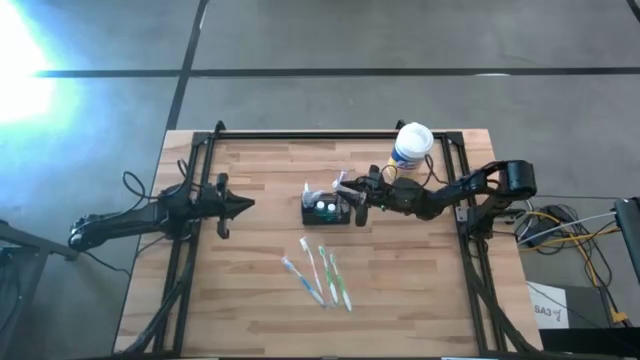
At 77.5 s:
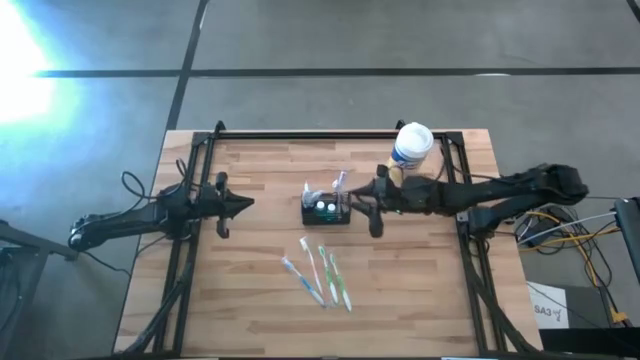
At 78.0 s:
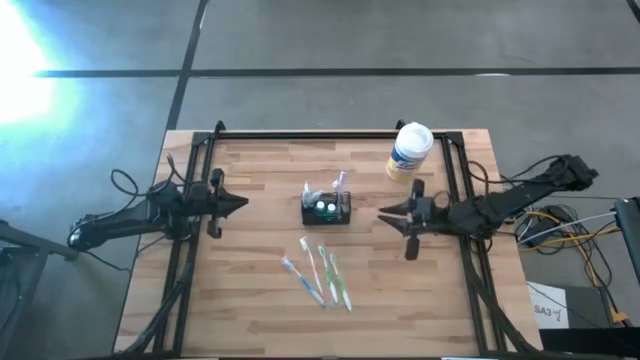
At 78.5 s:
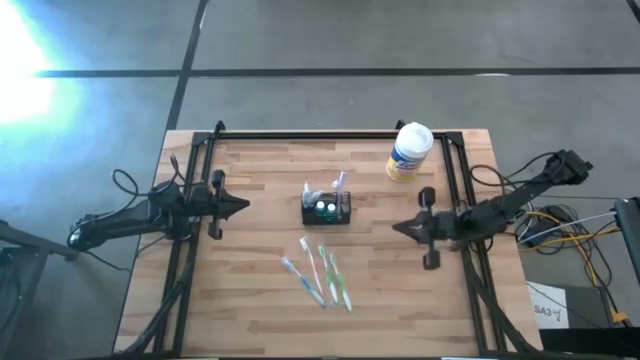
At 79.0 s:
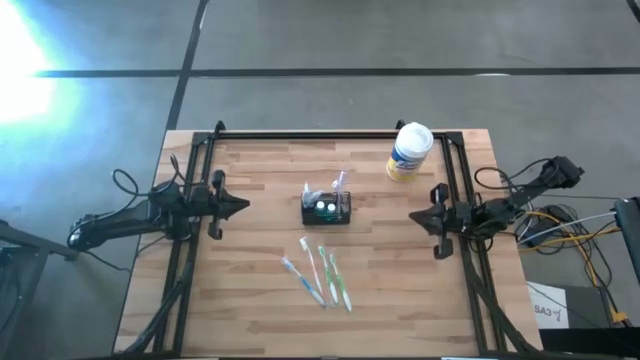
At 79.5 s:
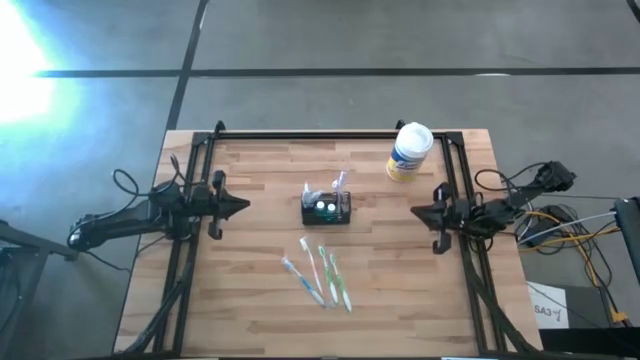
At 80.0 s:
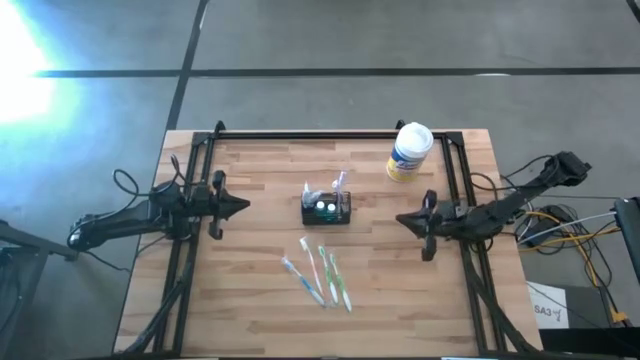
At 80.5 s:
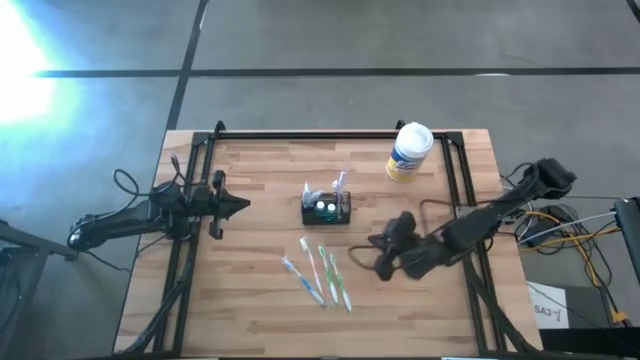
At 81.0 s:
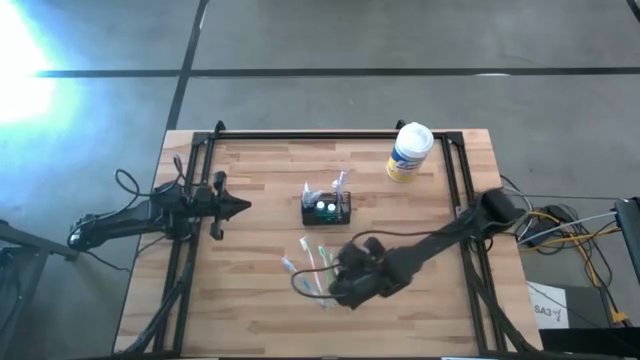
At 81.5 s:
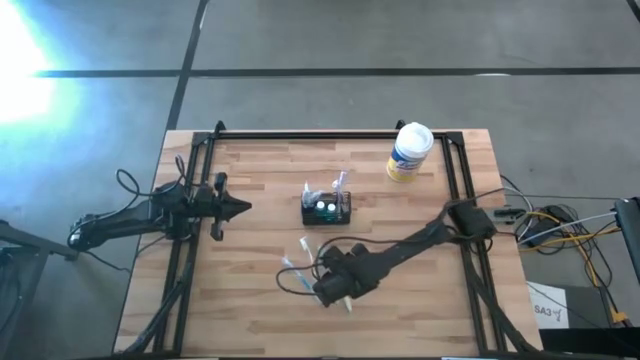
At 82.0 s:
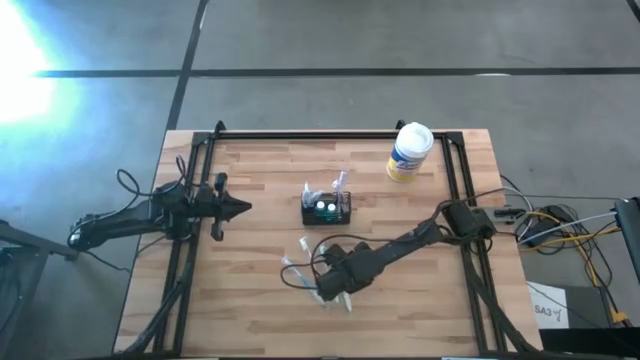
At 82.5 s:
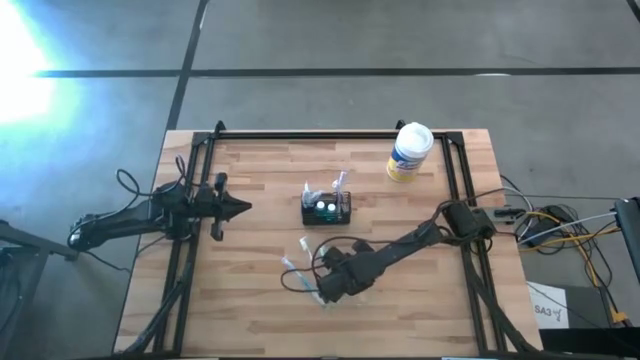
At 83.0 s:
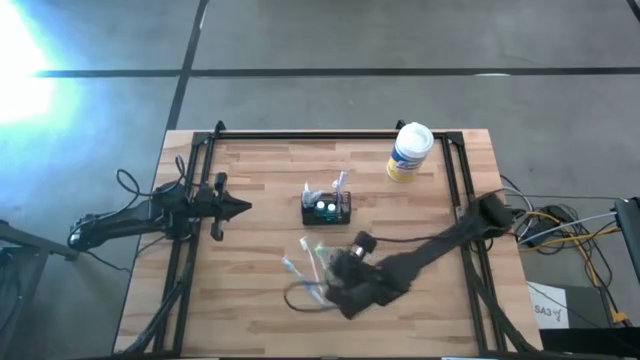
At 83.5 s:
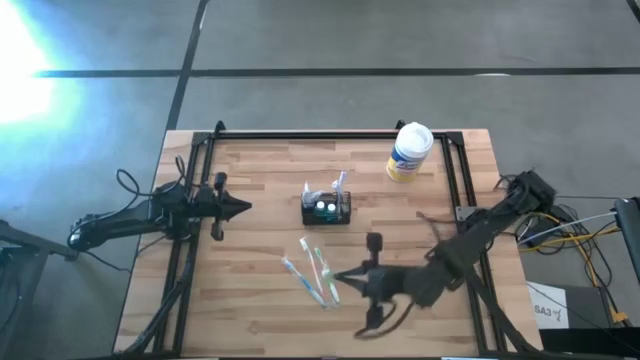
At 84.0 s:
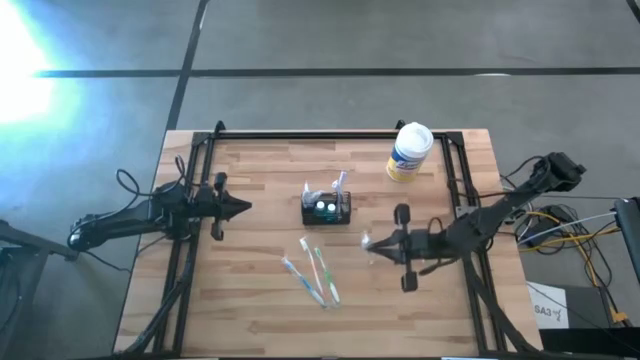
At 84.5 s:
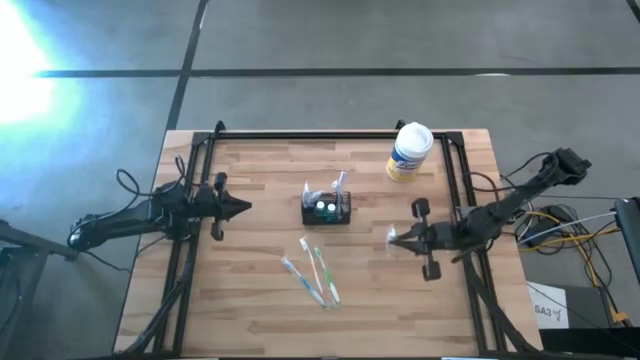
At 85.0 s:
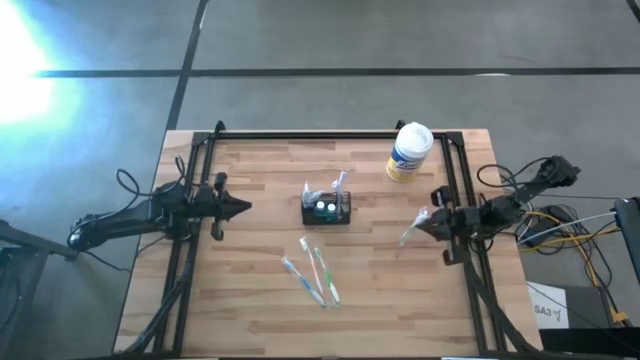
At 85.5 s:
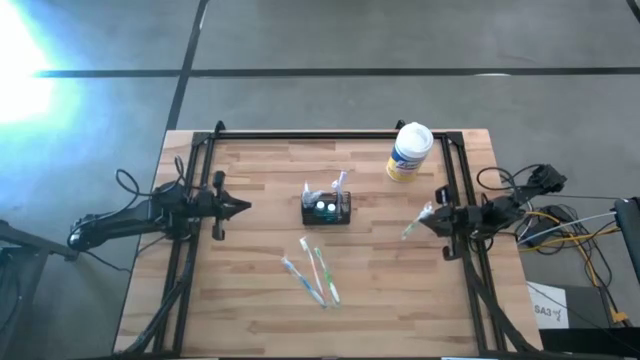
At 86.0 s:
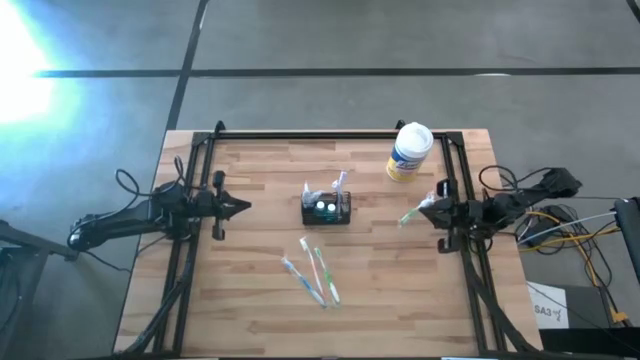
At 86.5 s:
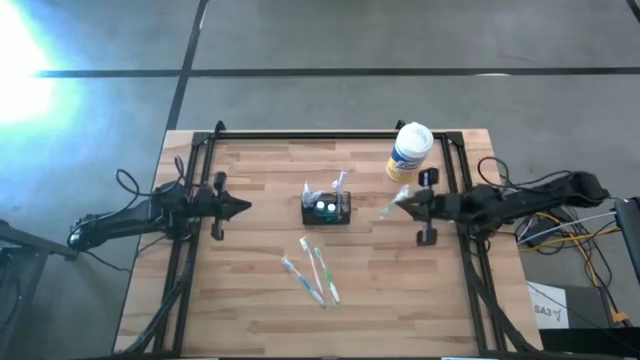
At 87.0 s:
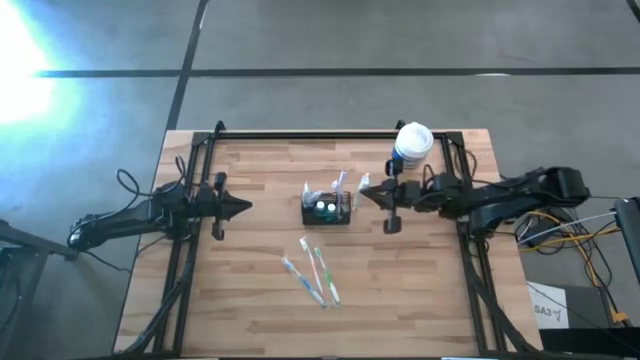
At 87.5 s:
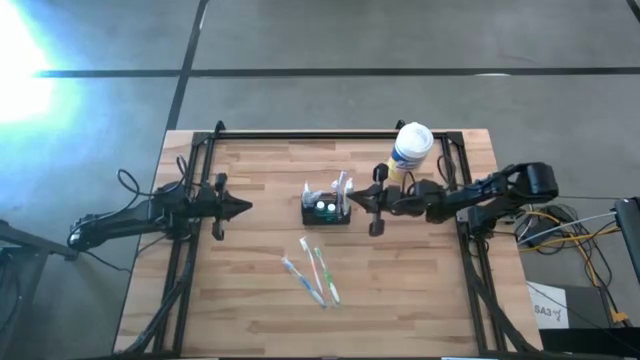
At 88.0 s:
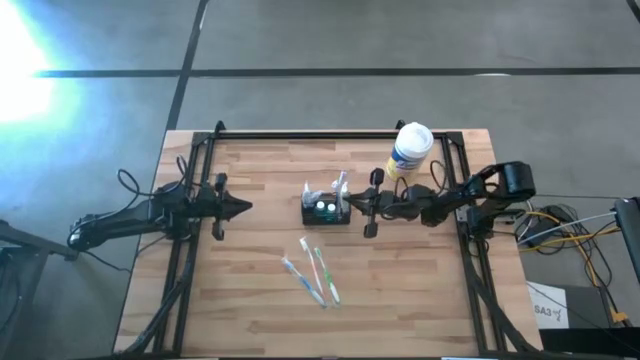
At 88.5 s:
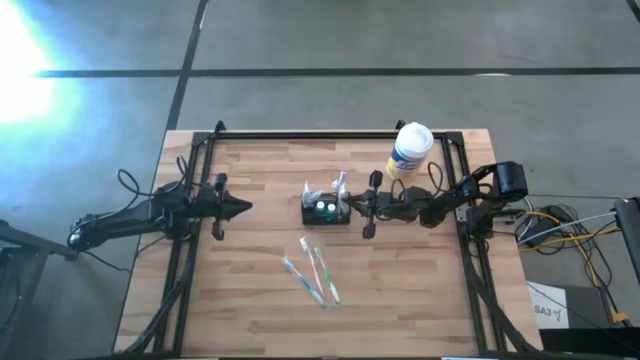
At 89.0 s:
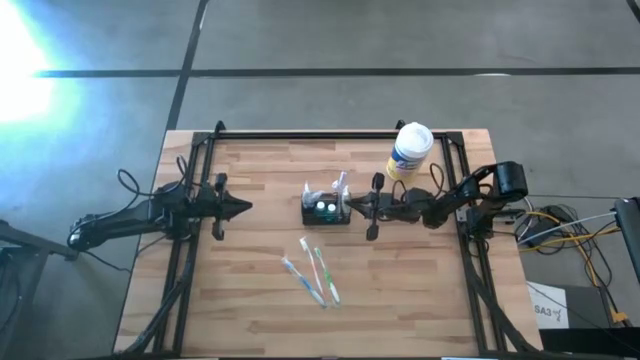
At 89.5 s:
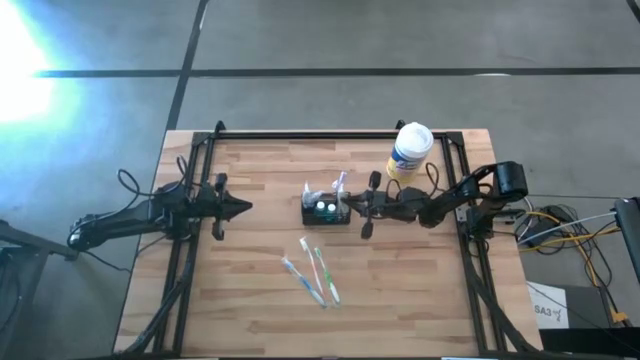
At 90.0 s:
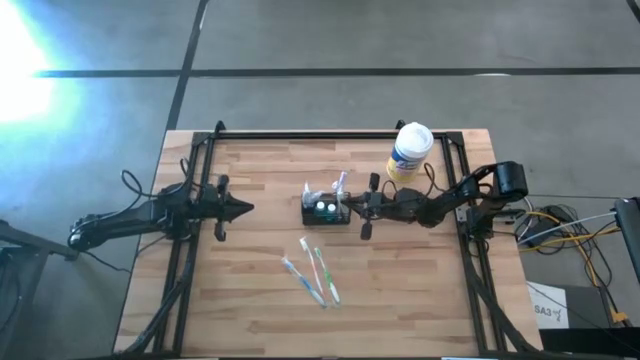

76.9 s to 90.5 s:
Task: Pick & Place toothbrushing station
Put the right green toothbrush into the black wire organizer

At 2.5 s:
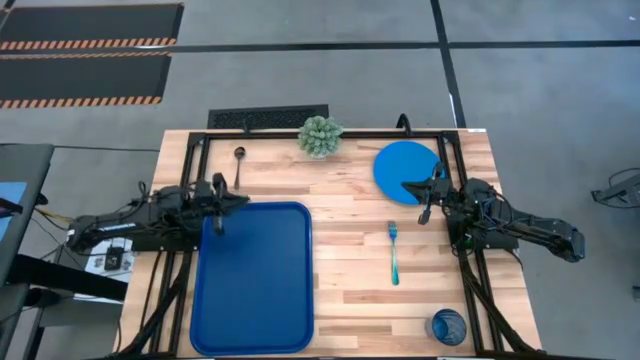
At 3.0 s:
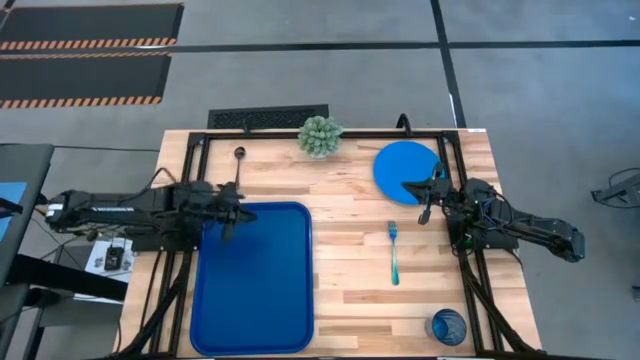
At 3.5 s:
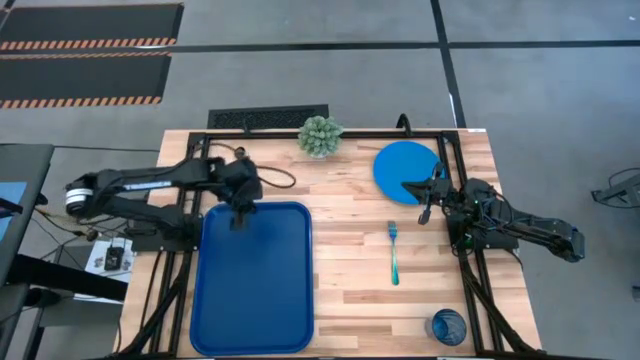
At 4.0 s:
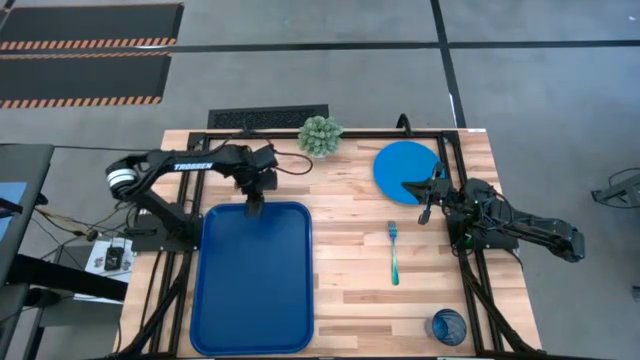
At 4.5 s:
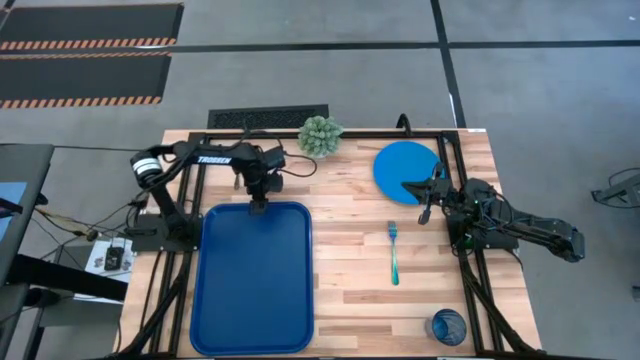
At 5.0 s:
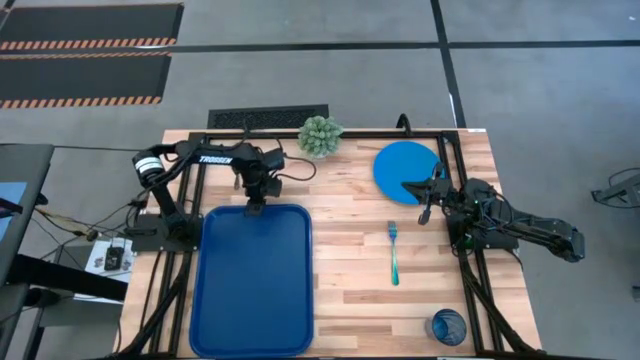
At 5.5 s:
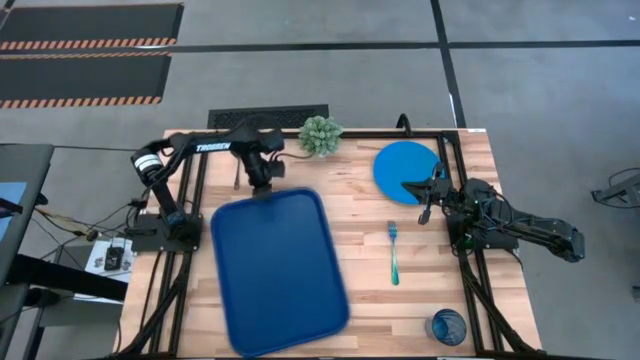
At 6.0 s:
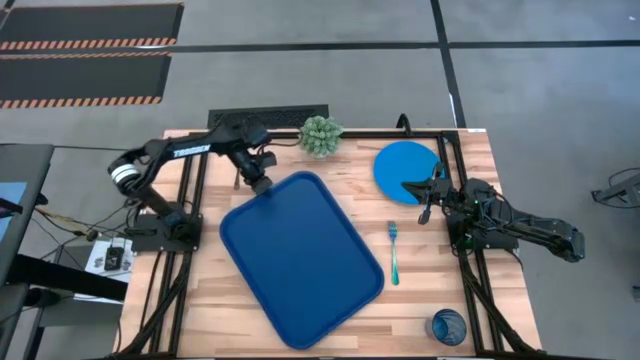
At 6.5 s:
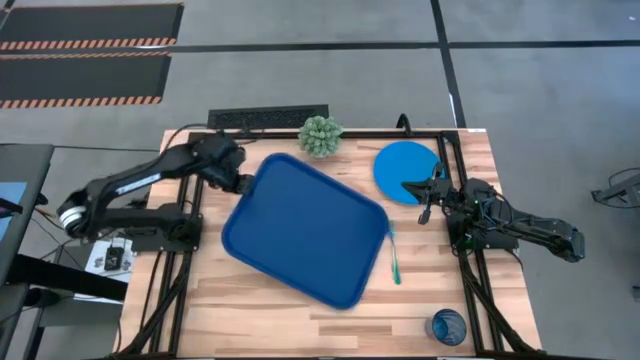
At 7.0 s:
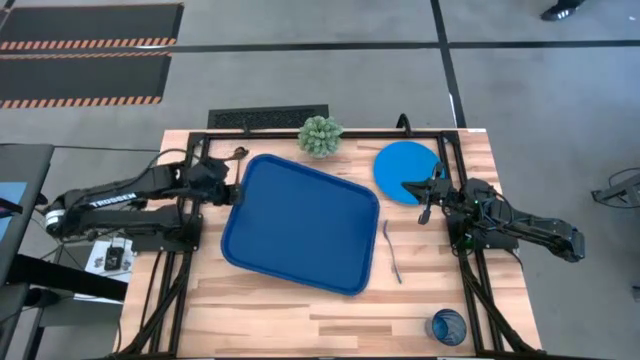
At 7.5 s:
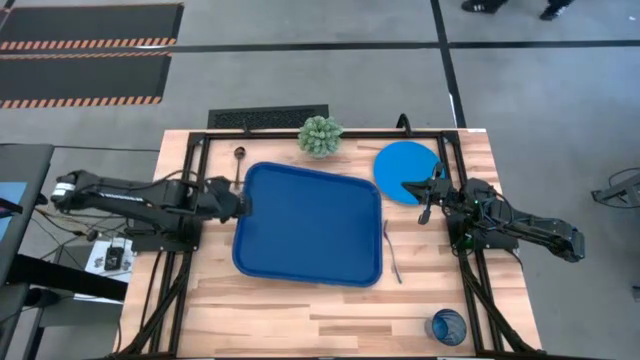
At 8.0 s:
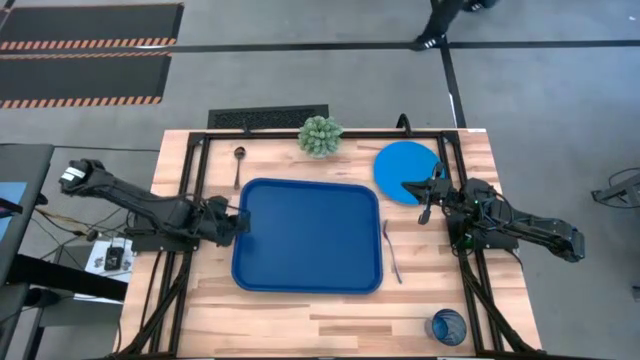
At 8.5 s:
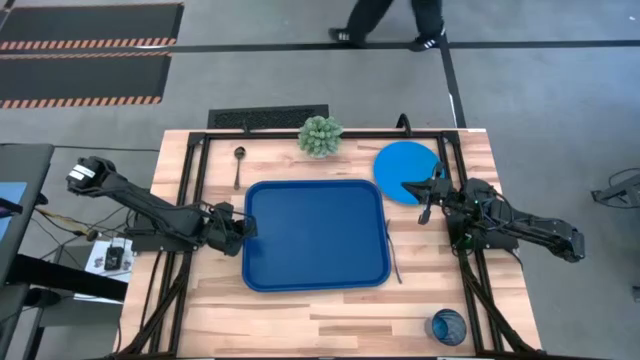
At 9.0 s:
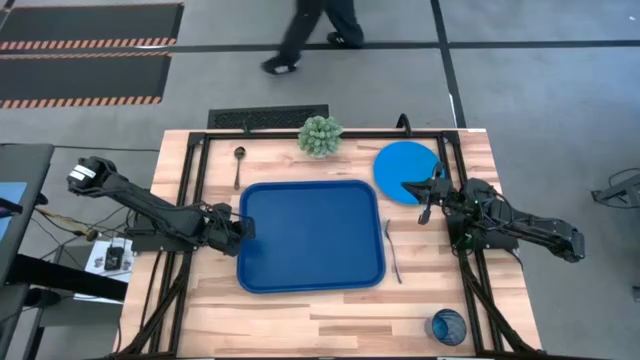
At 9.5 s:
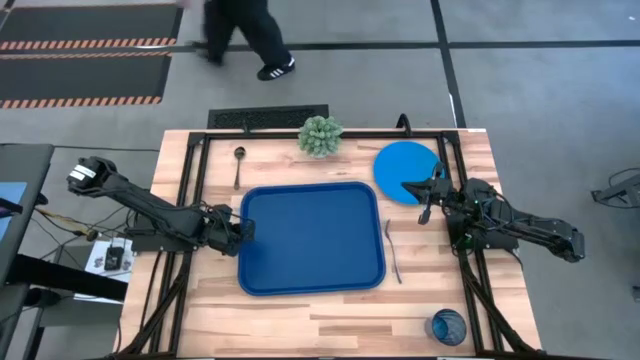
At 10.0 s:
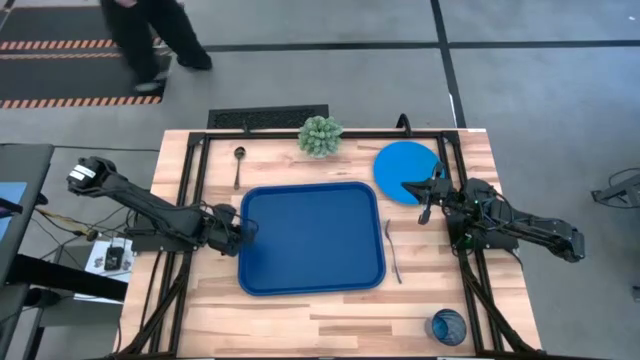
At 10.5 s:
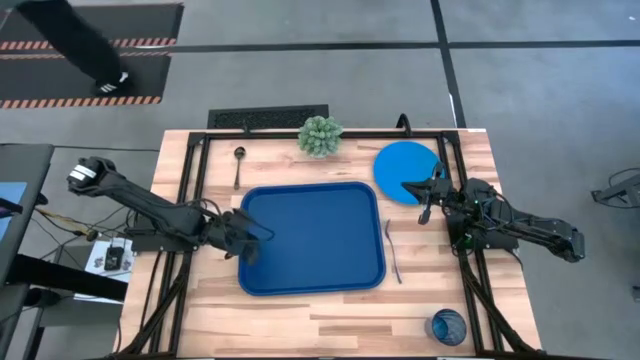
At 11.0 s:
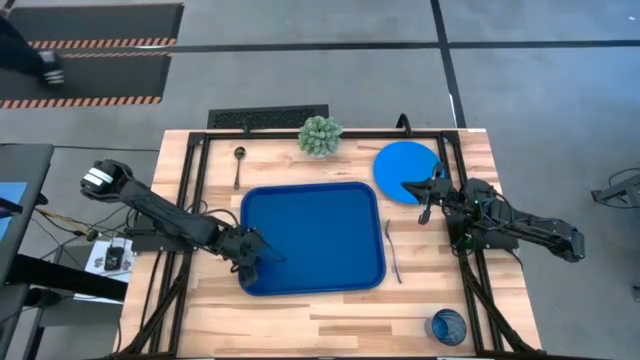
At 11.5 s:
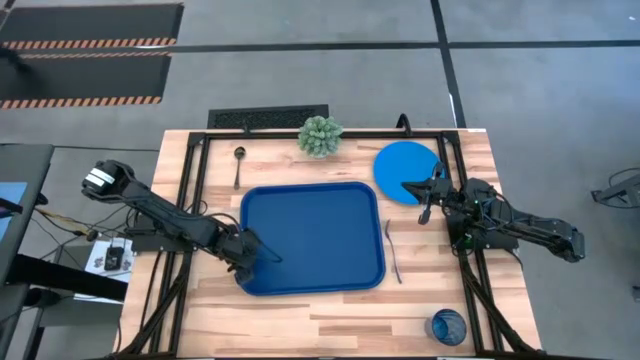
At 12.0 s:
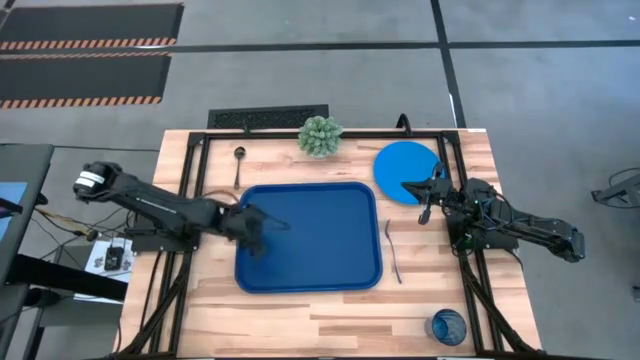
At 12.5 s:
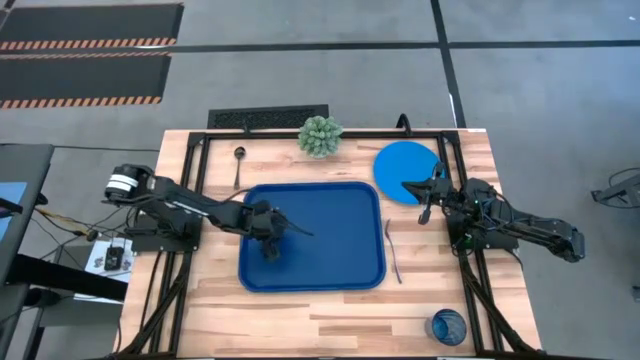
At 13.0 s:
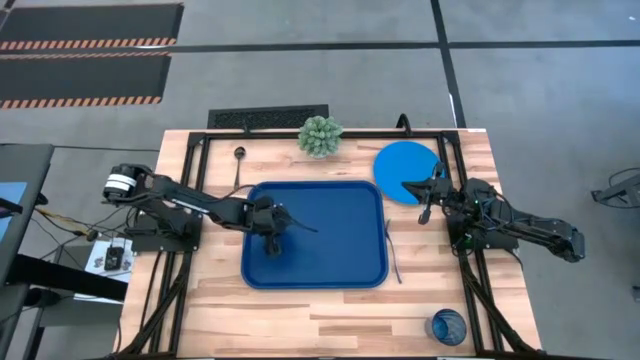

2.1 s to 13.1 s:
Task: Pick and place plate/cup/fork/spoon on tray
Move the blue serving tray to the center
